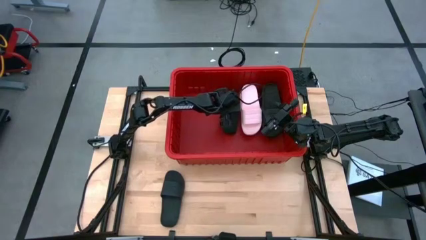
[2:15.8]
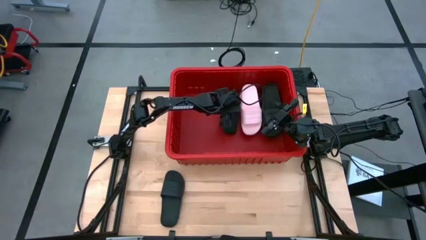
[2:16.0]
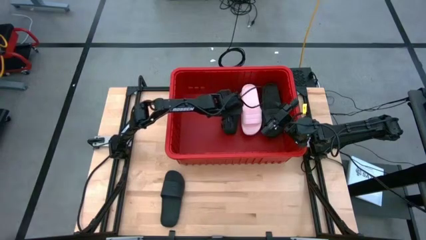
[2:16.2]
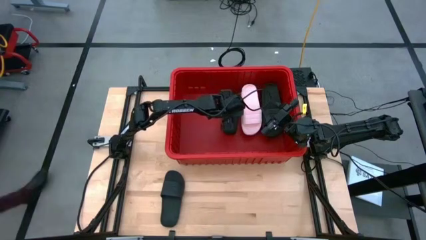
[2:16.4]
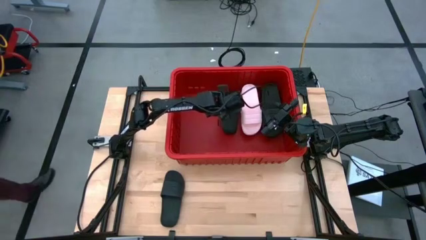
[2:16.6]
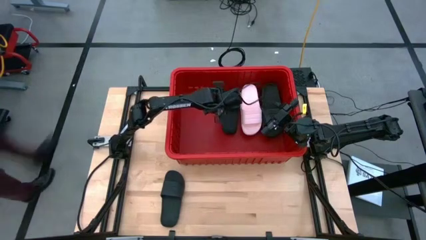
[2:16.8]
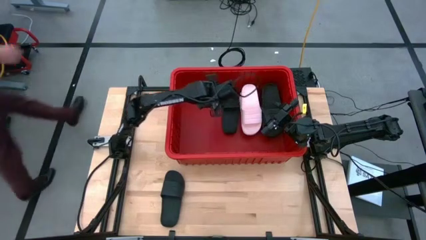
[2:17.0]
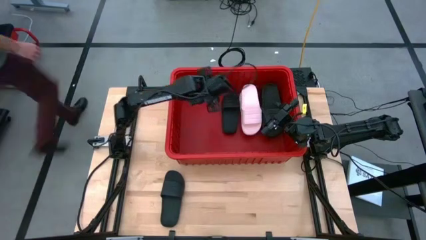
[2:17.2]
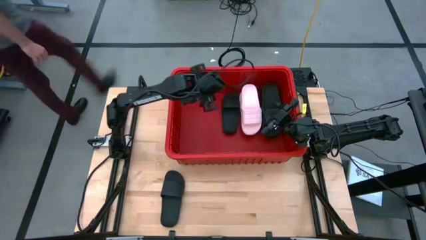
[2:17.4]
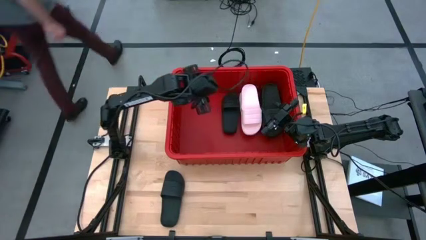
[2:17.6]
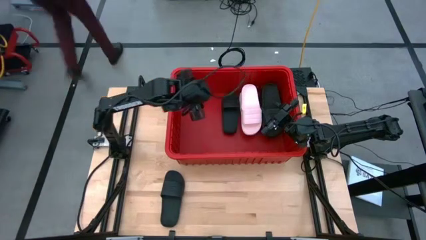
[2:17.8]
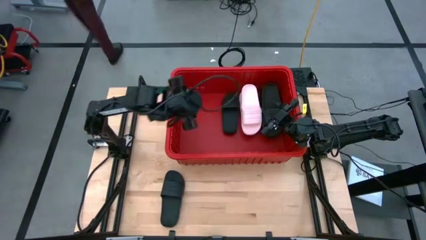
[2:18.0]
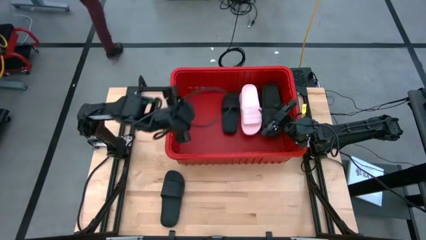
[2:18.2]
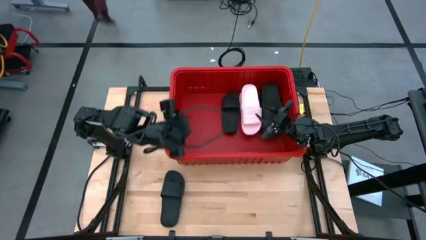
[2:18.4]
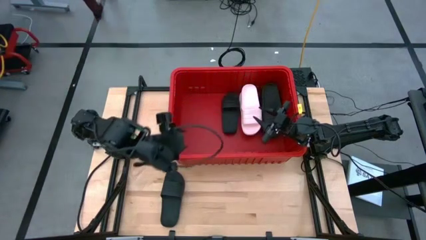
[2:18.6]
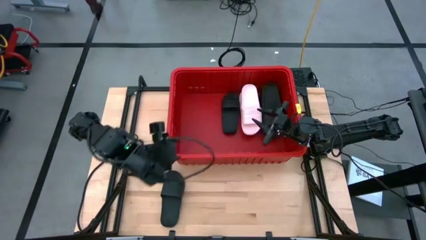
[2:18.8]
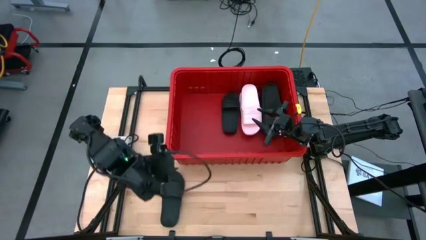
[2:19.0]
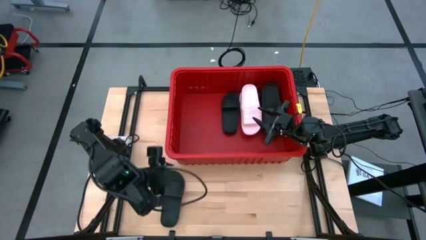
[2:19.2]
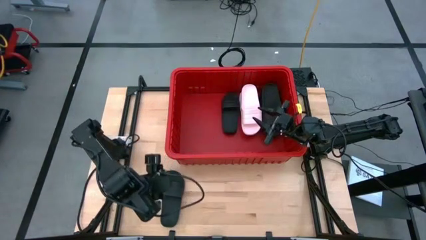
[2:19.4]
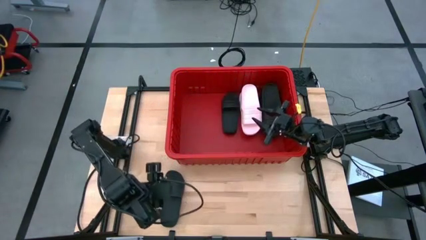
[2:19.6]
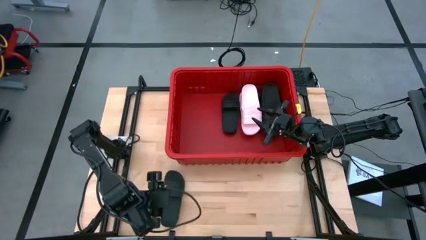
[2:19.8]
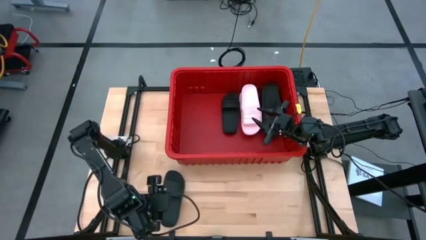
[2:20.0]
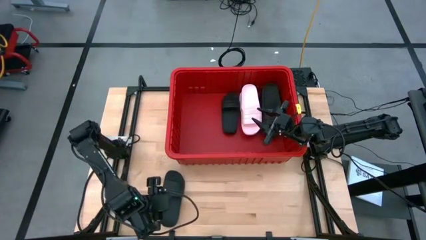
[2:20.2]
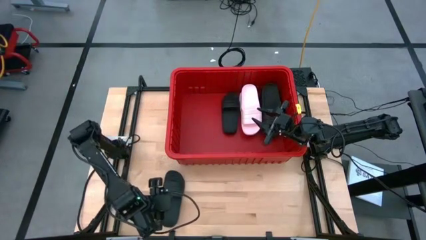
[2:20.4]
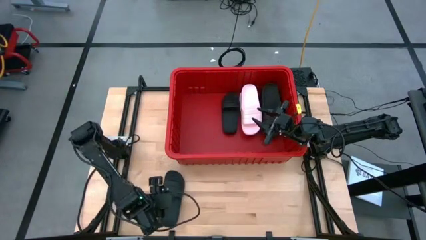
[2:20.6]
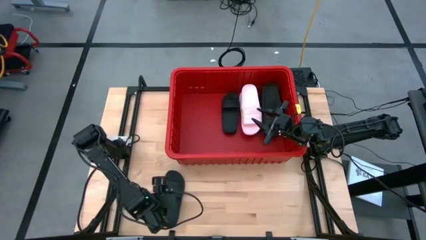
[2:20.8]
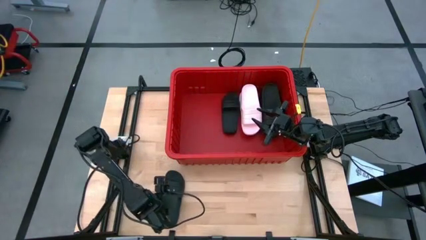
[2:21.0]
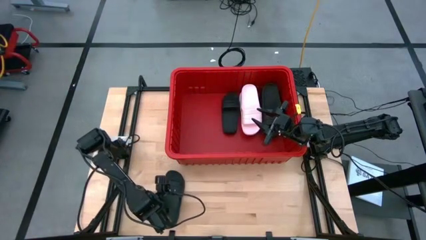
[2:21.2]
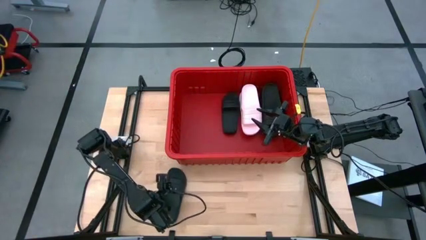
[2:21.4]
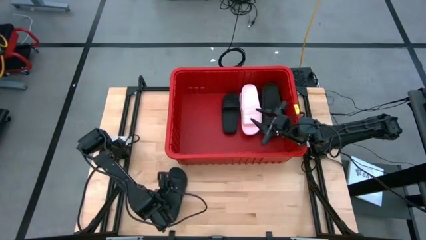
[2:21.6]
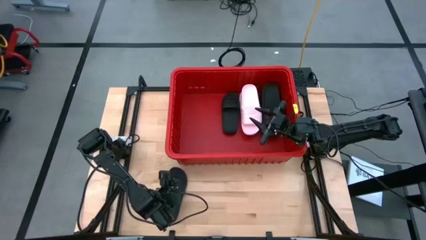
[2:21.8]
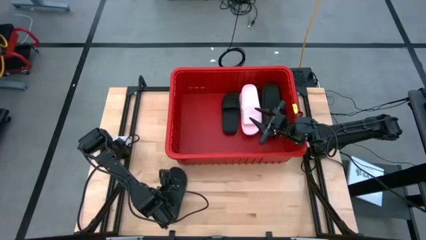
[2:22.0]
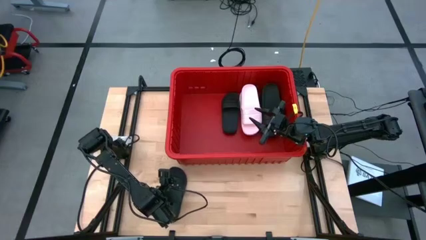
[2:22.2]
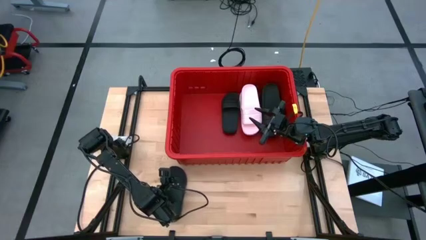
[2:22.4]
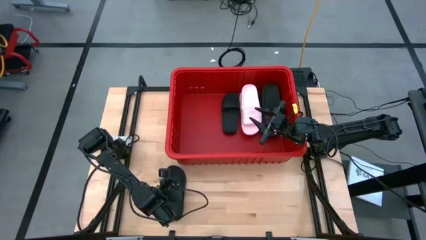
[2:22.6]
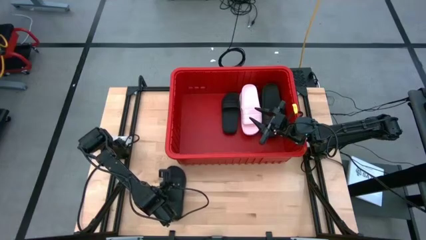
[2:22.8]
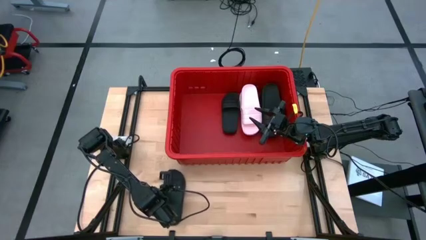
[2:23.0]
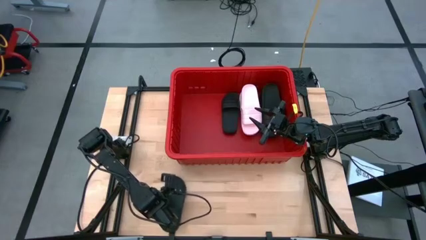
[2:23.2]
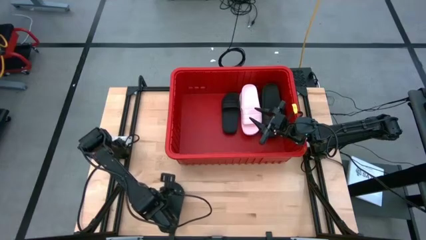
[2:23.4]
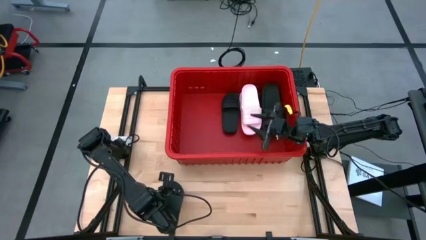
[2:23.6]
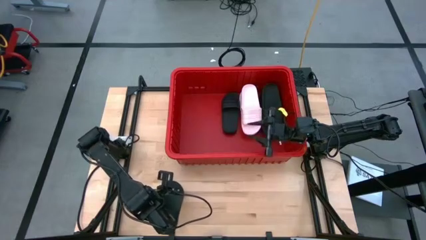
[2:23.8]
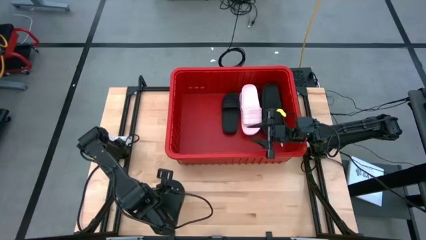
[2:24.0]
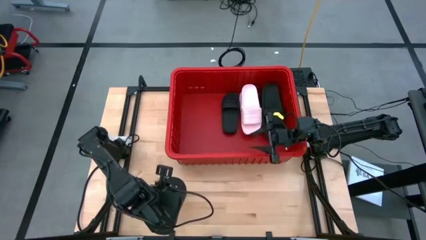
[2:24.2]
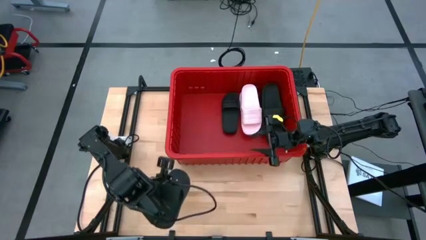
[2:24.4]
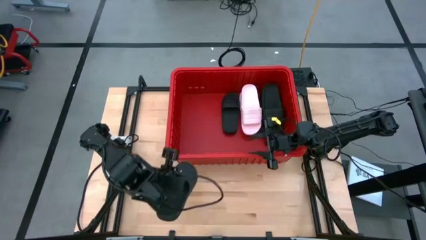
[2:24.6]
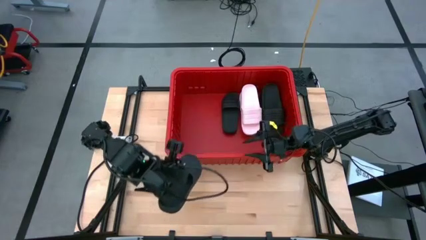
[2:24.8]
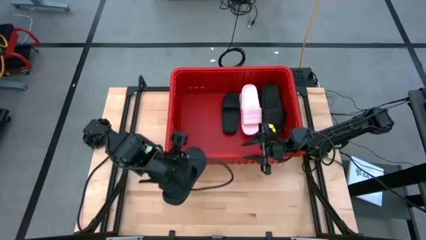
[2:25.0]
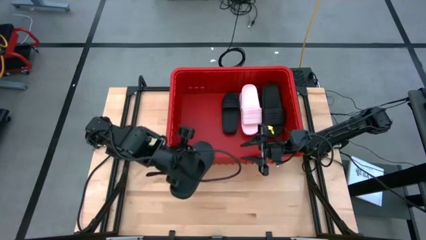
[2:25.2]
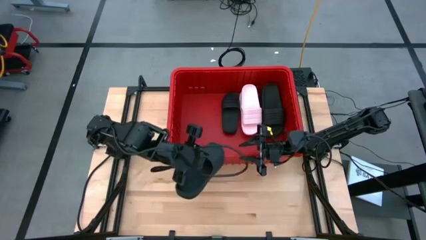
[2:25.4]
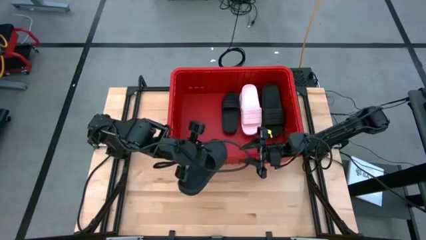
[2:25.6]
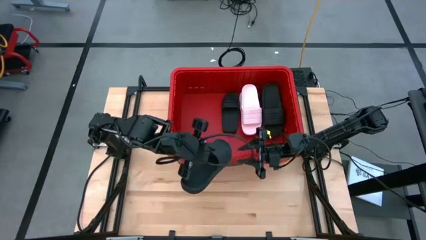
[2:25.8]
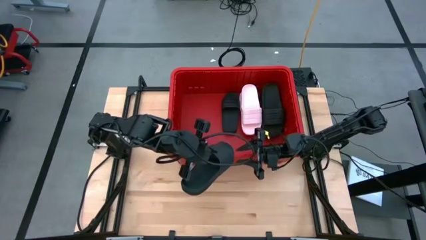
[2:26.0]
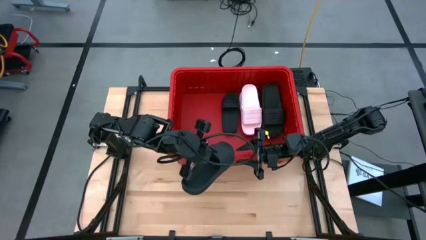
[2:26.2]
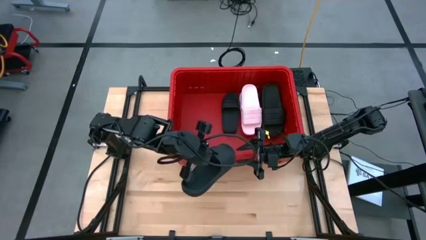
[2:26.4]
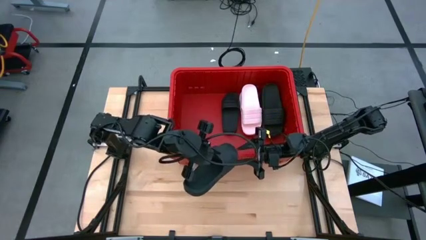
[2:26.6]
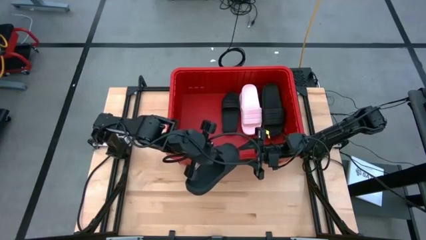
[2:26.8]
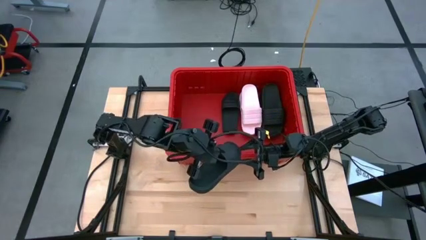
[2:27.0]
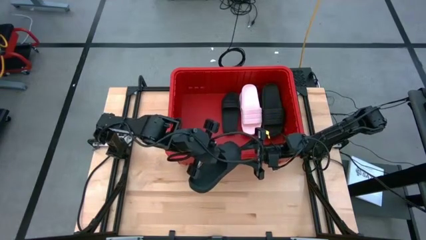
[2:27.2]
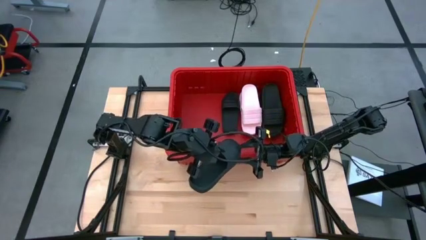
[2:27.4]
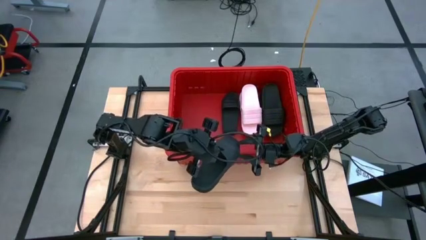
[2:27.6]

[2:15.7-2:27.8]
Task: Pick and place slides into bin
Put the black slide into the red organizer bin
